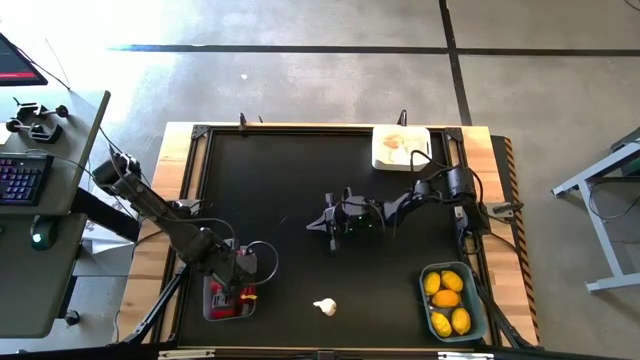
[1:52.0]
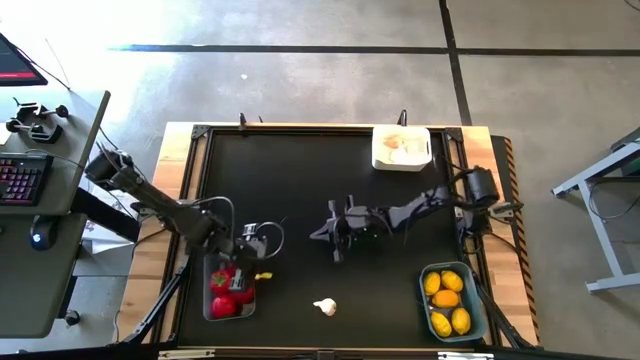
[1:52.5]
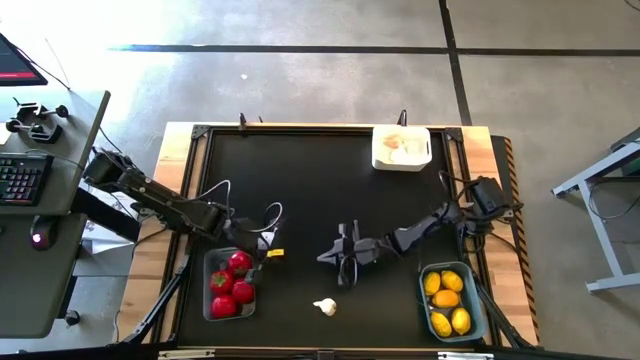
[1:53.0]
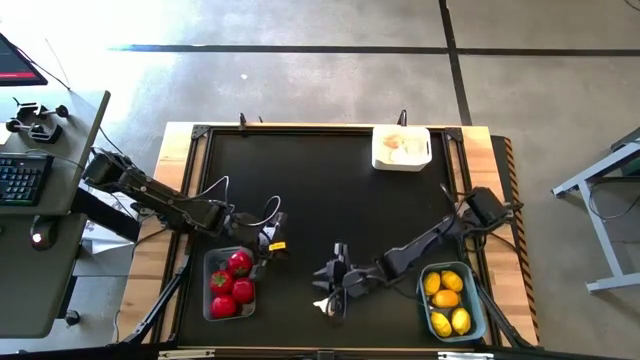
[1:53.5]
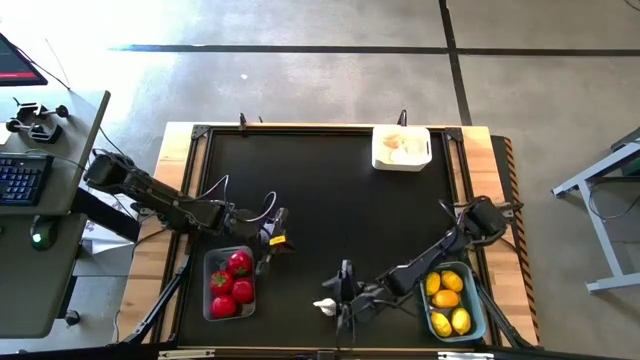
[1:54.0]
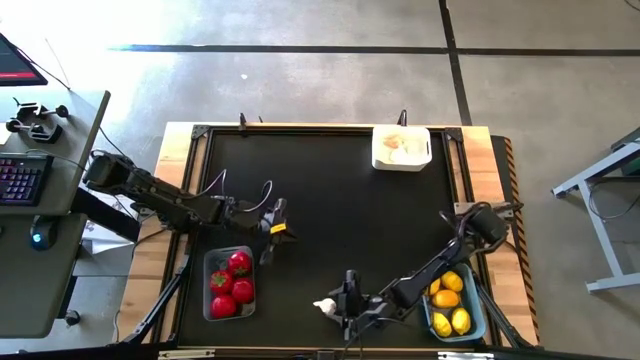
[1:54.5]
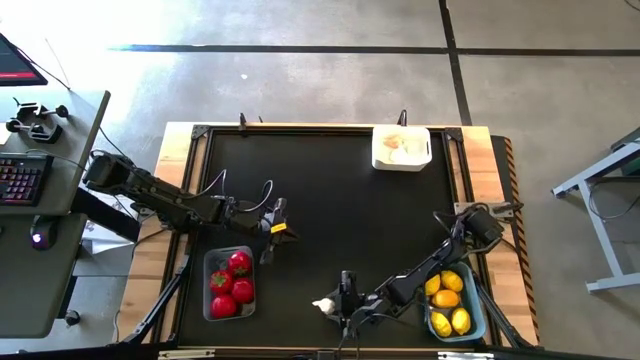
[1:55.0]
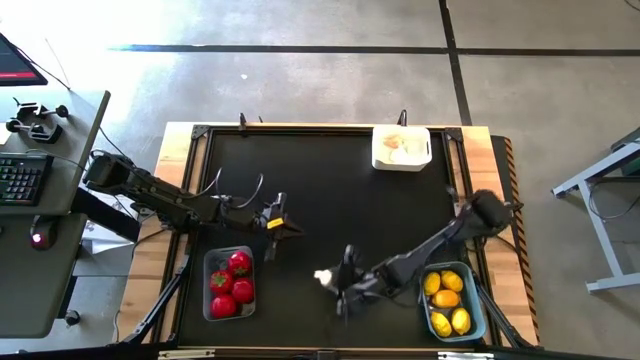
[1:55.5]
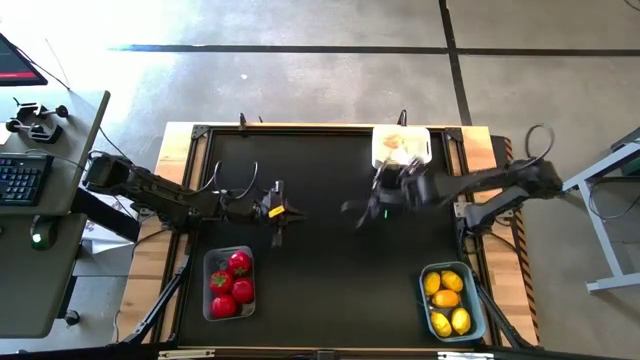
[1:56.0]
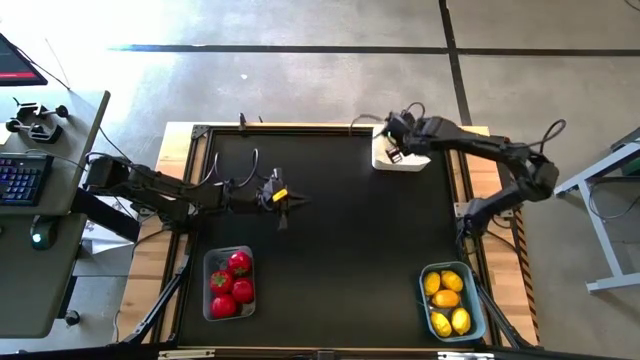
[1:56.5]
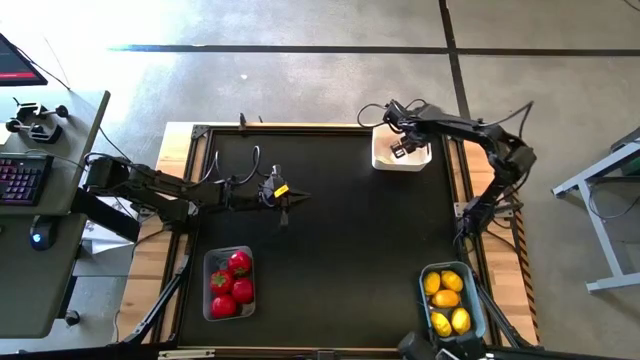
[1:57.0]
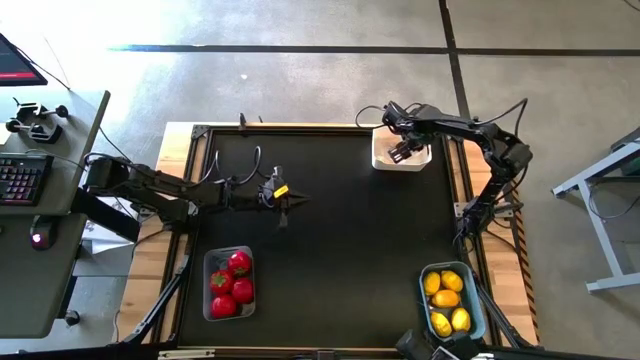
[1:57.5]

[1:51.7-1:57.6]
Task: Sort produce into baskets
Put the garlic into the white bin

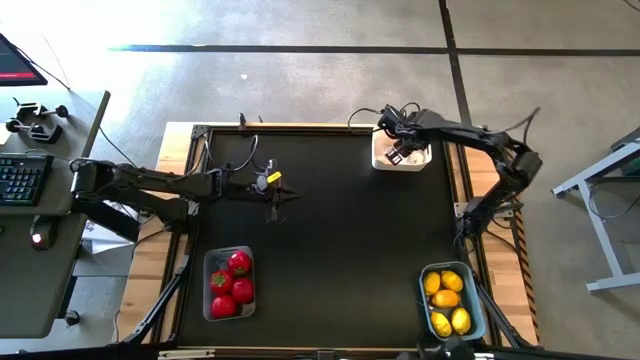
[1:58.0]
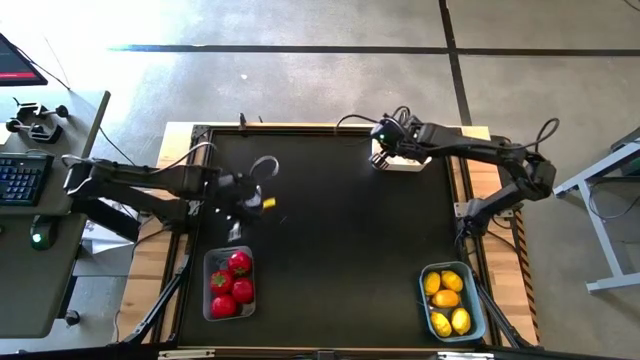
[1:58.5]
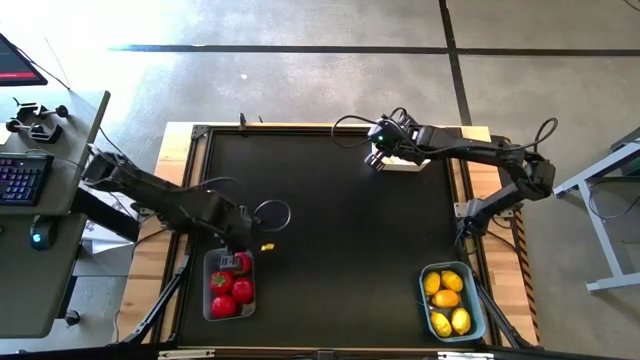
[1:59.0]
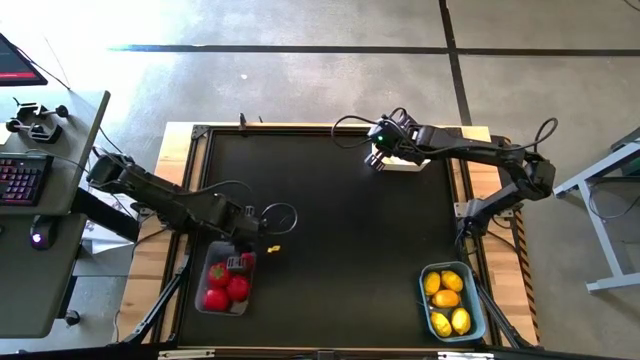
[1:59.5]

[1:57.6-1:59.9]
Adjust the transparent bin

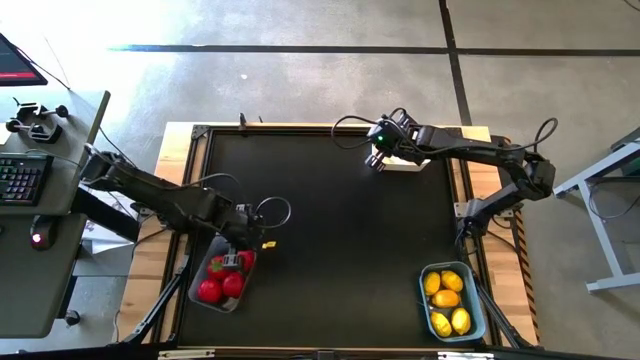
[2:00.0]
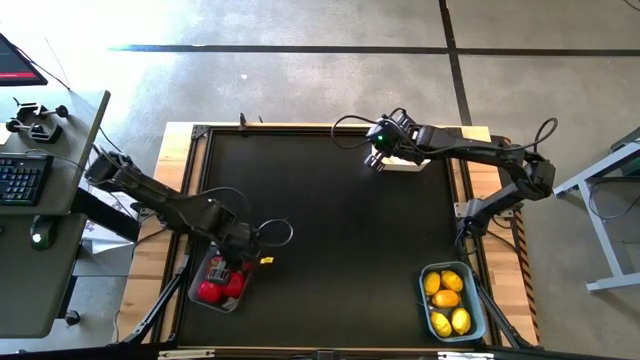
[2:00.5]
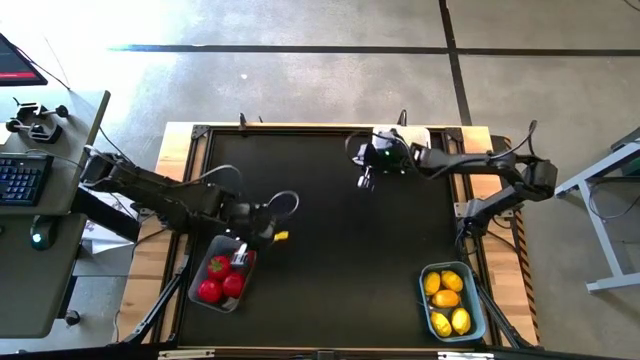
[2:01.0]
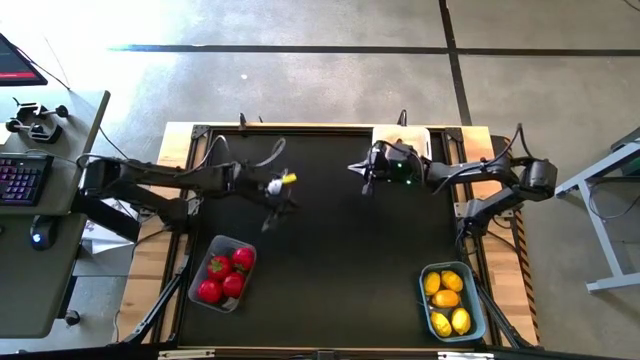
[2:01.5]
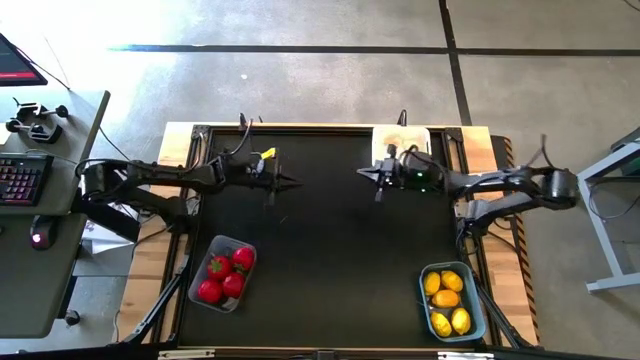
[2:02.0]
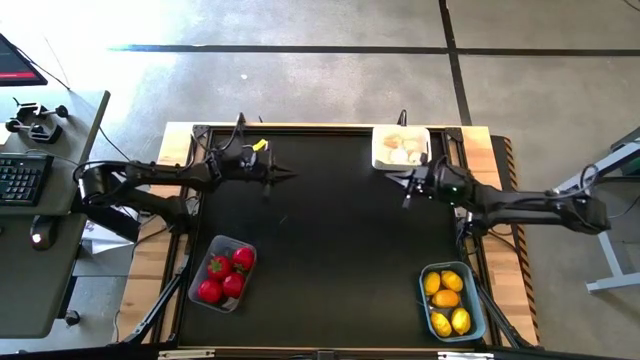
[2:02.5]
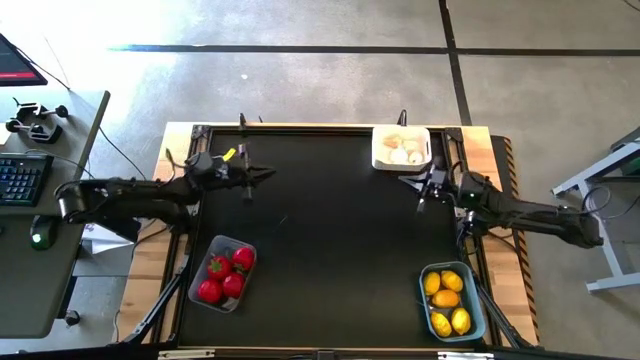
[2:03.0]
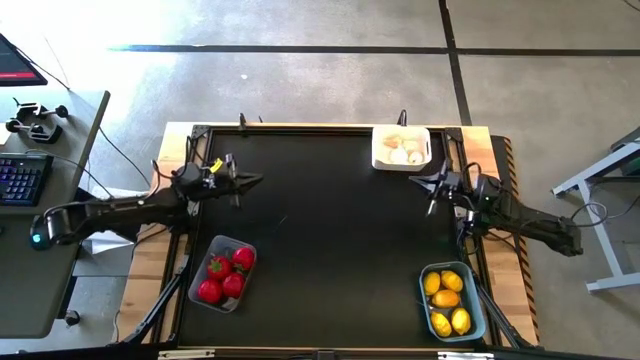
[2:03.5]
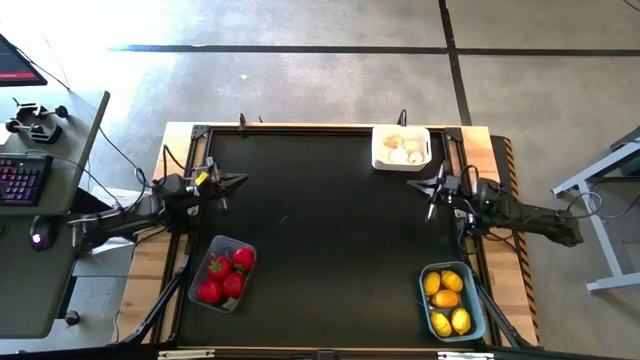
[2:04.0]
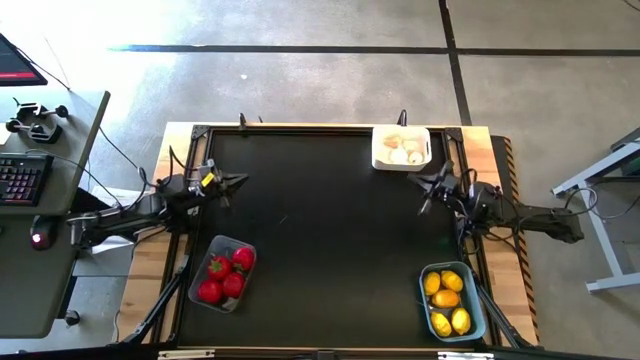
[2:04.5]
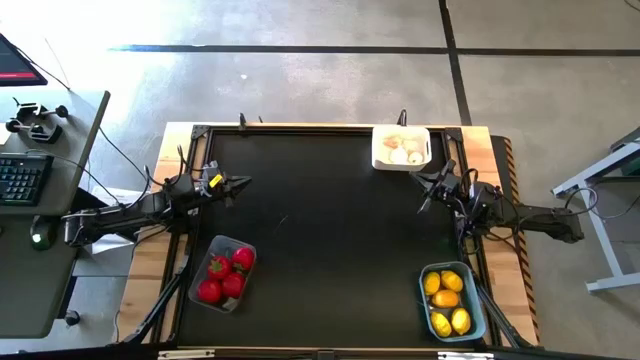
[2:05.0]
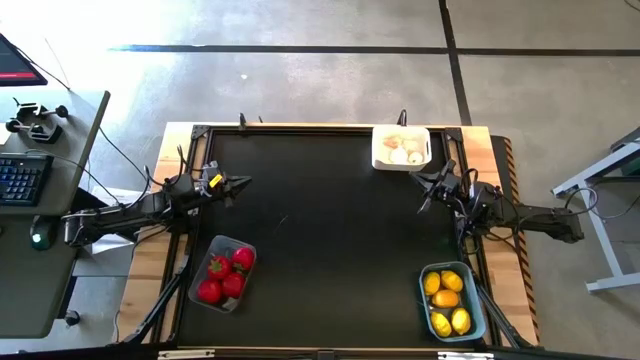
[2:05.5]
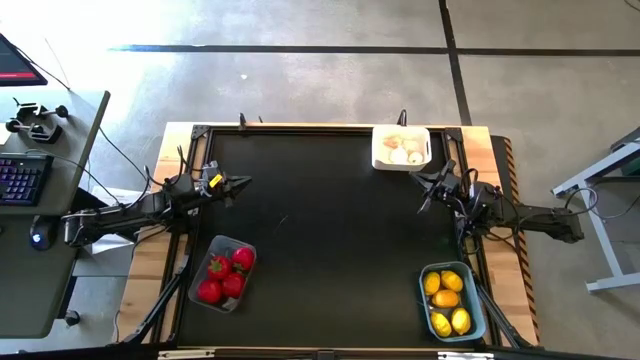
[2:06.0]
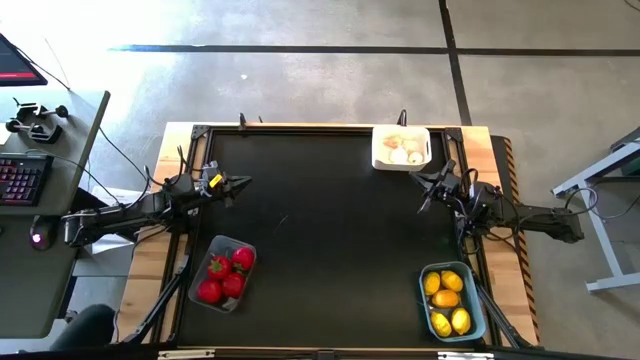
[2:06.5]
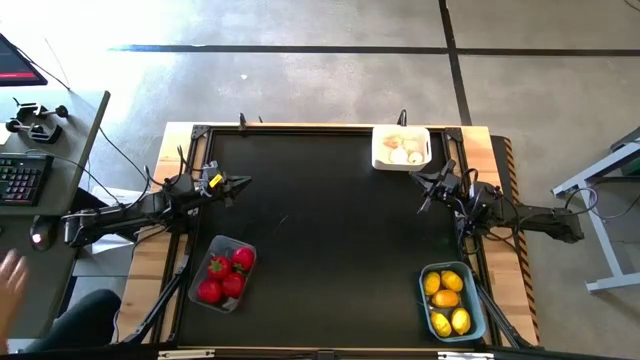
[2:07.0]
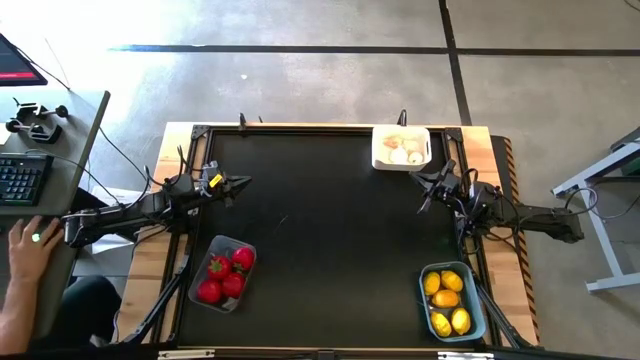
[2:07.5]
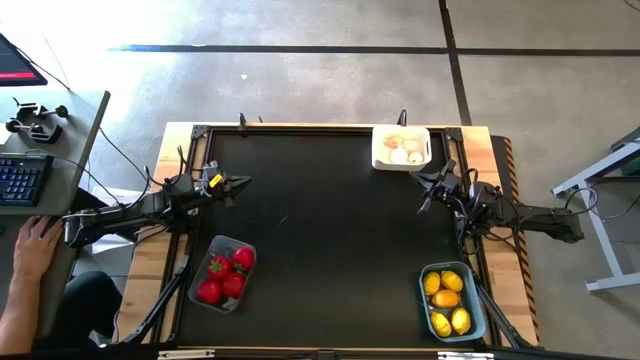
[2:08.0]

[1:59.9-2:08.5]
Return to Home Position

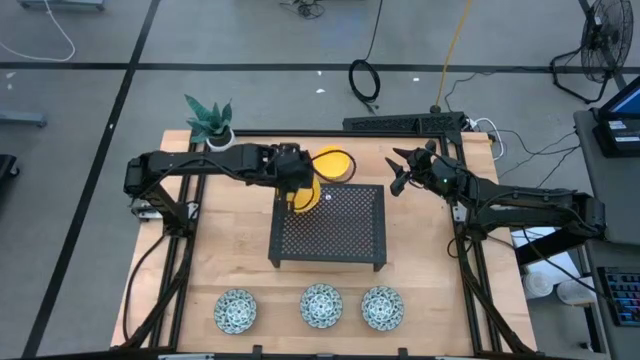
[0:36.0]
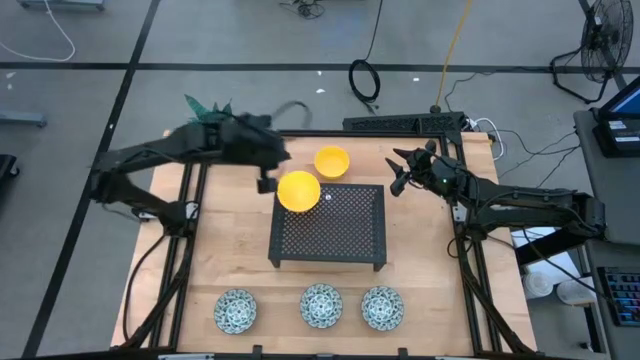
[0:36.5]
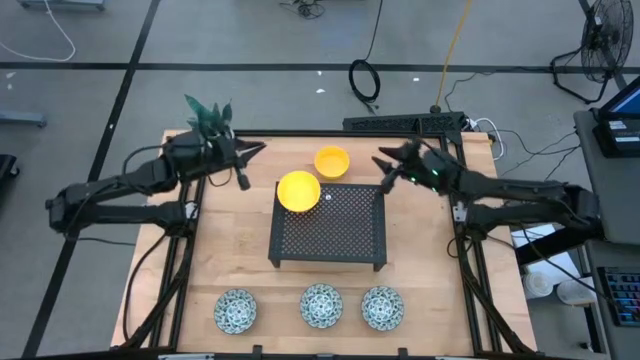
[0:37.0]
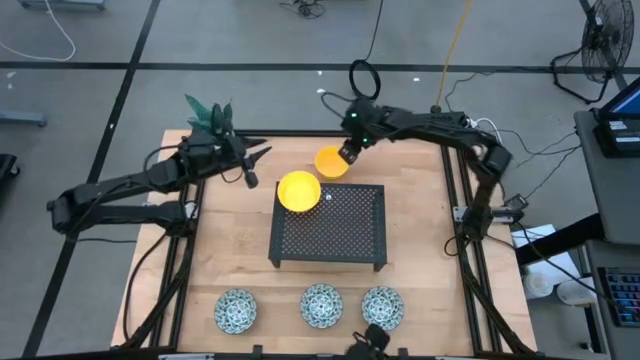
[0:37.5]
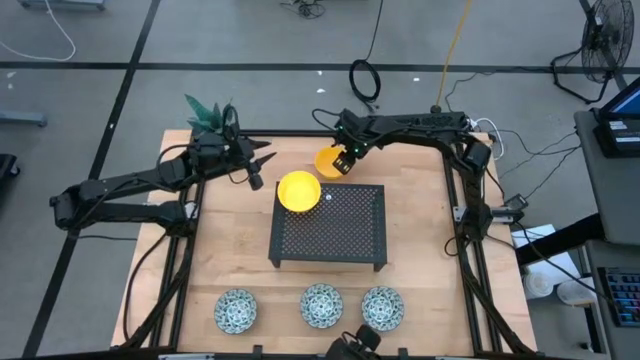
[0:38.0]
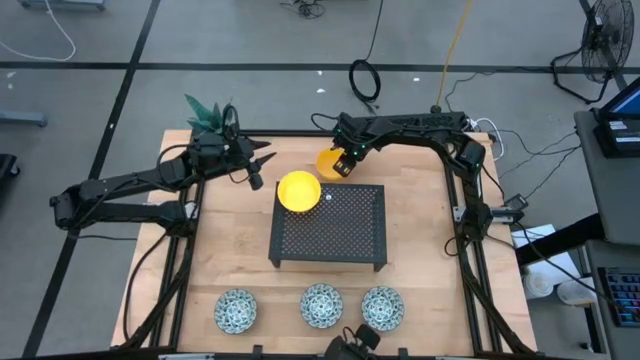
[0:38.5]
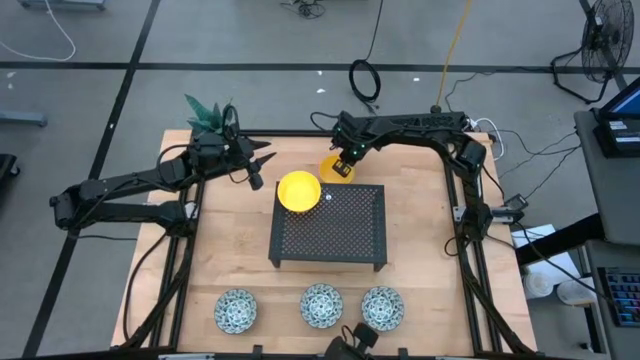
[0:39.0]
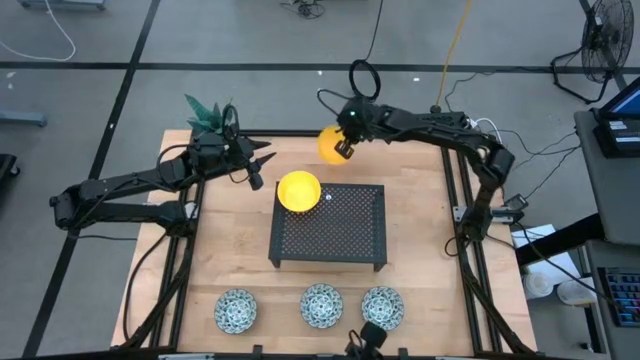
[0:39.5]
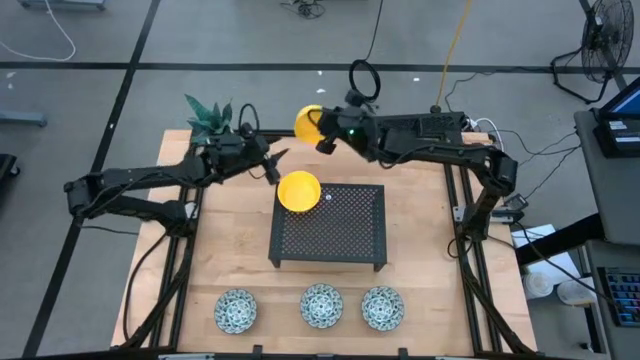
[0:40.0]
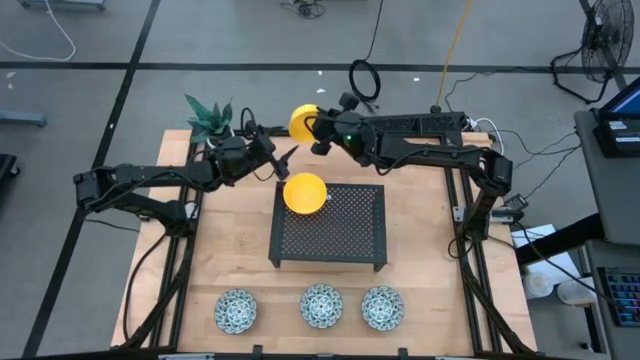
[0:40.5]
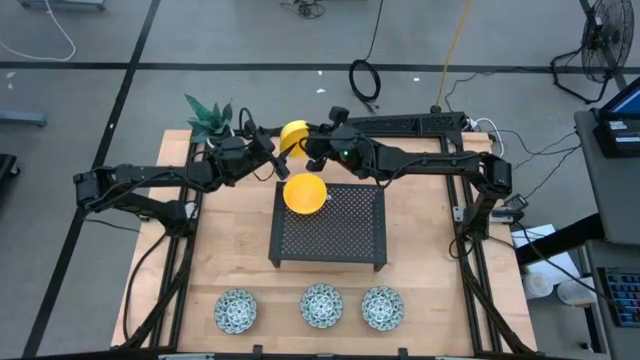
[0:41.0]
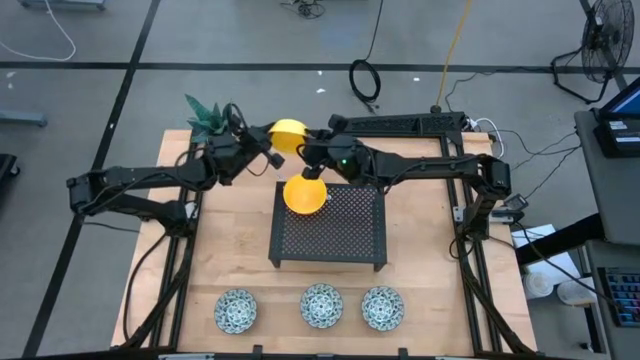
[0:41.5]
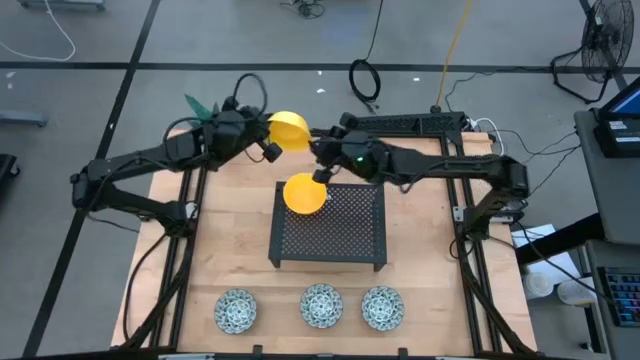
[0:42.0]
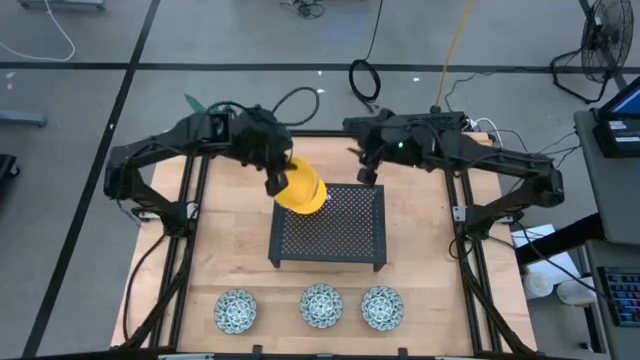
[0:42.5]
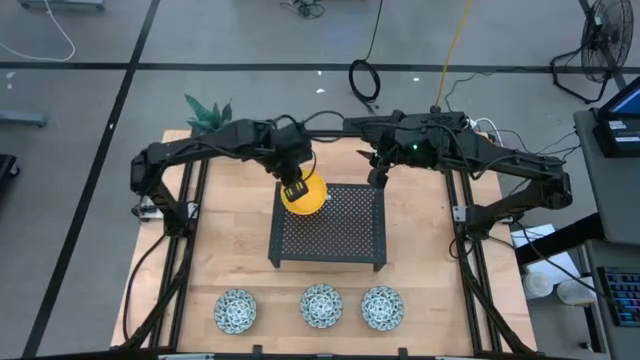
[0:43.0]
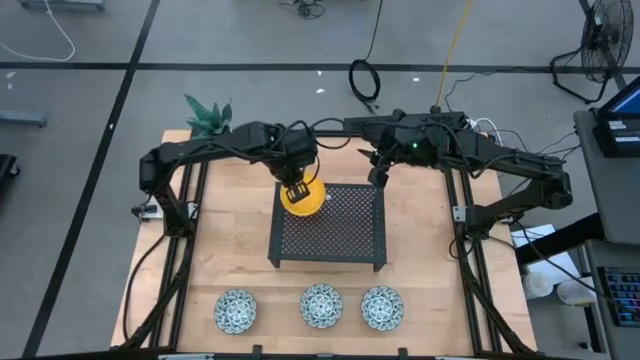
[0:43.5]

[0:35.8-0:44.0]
Task: Pick & Place Mini bowls
Stack the yellow bowl on top of the yellow bowl on the shelf
